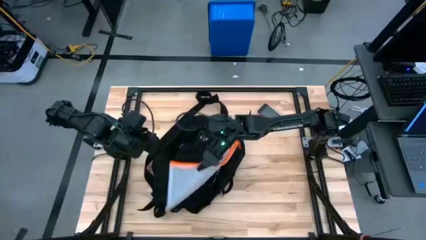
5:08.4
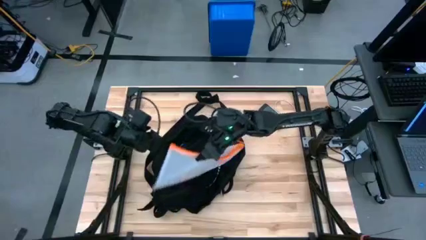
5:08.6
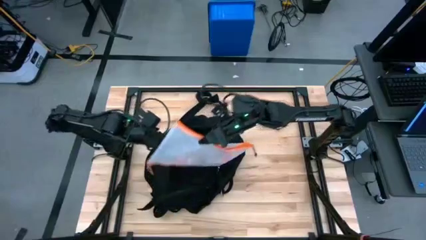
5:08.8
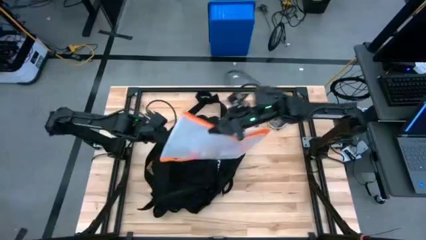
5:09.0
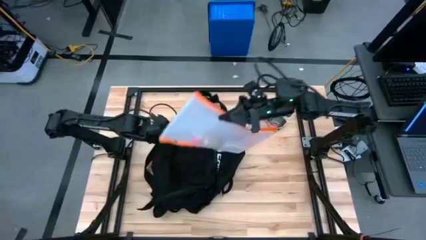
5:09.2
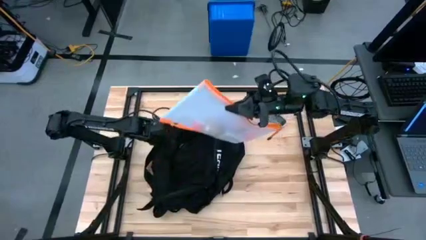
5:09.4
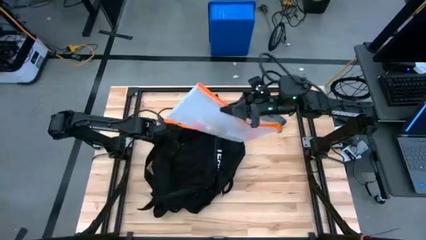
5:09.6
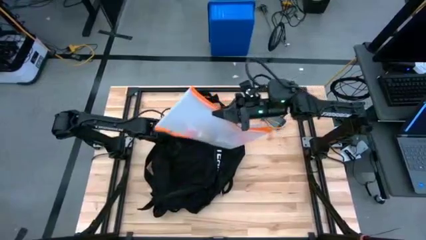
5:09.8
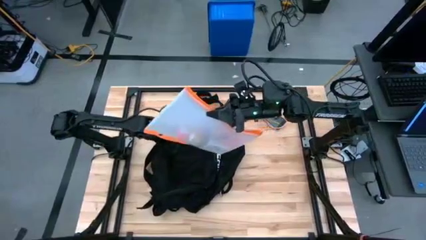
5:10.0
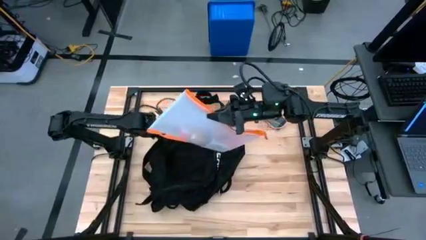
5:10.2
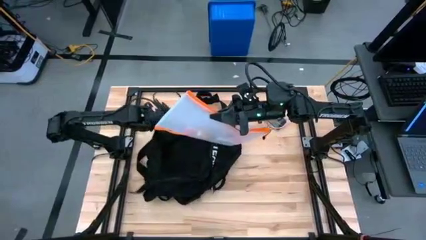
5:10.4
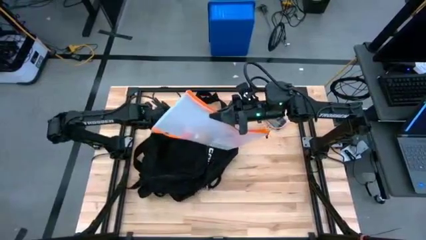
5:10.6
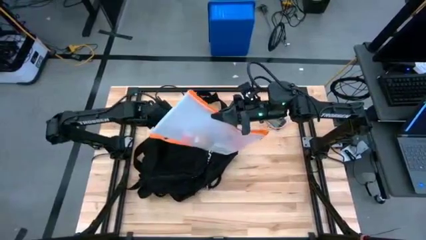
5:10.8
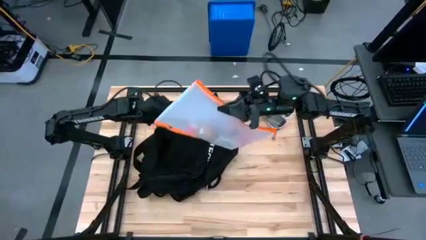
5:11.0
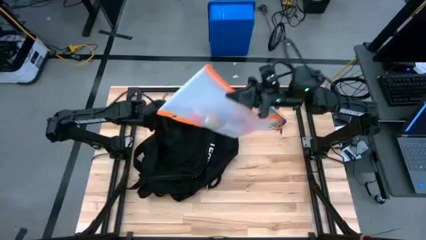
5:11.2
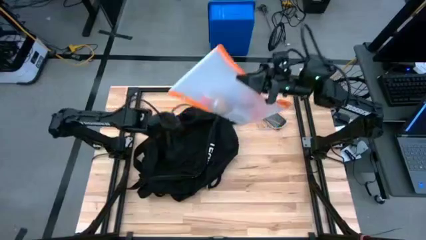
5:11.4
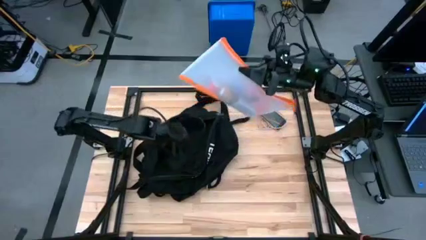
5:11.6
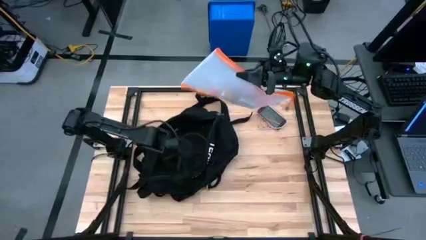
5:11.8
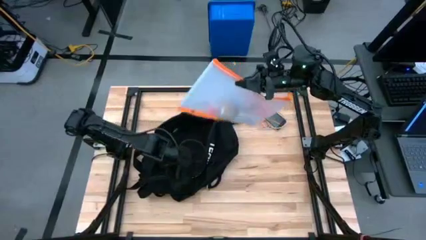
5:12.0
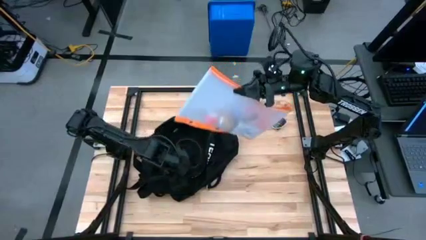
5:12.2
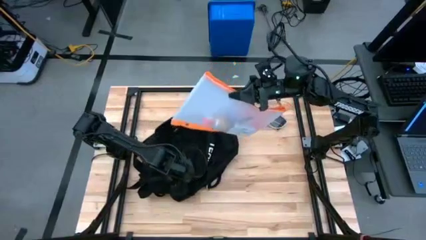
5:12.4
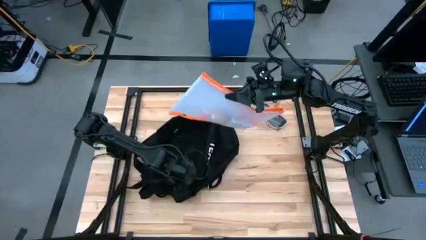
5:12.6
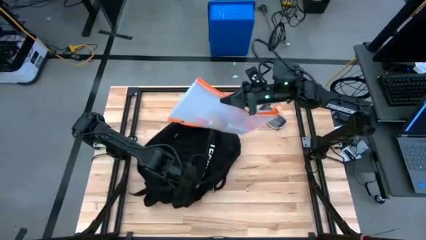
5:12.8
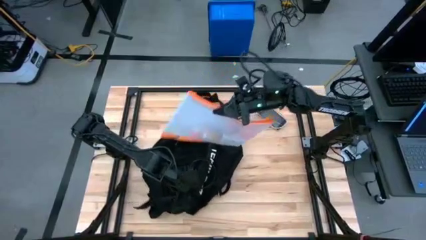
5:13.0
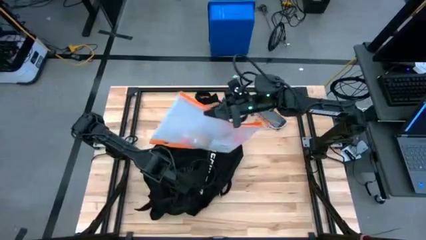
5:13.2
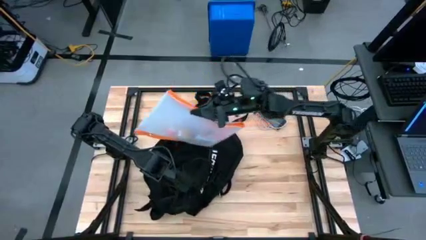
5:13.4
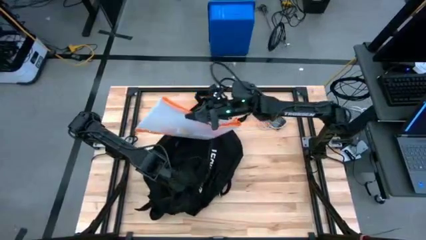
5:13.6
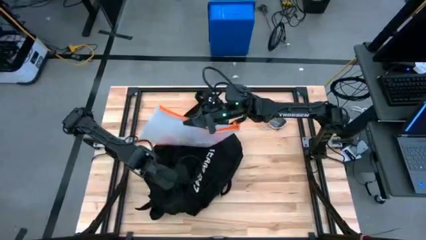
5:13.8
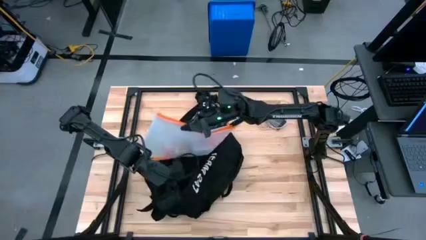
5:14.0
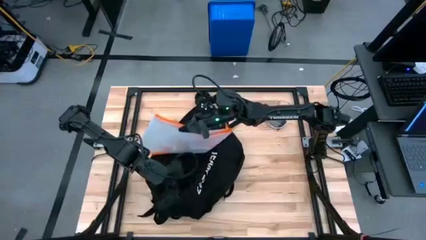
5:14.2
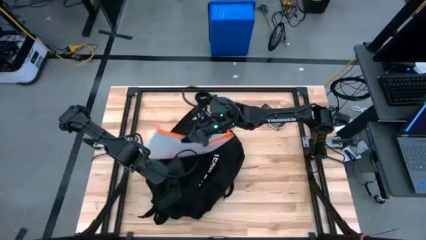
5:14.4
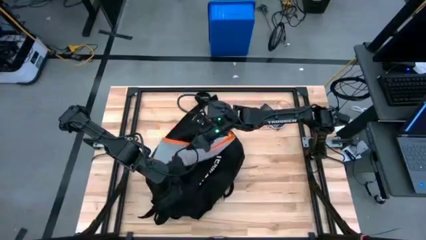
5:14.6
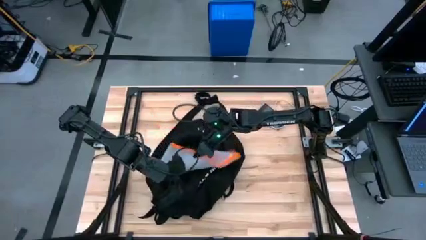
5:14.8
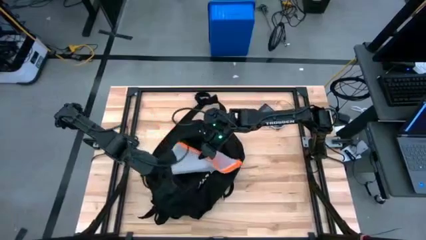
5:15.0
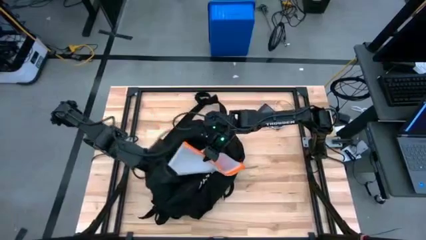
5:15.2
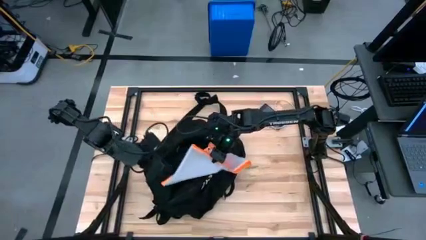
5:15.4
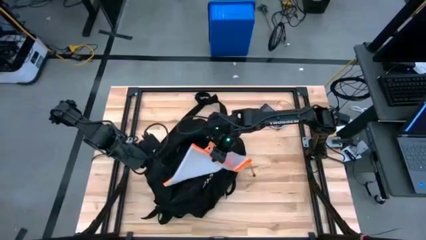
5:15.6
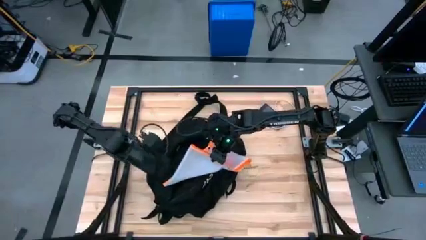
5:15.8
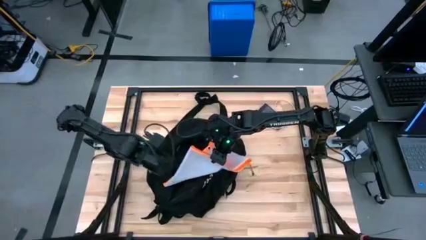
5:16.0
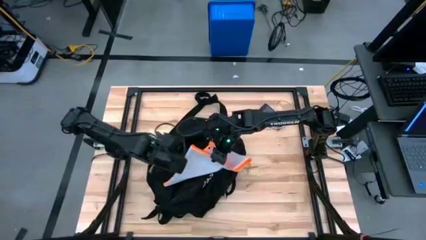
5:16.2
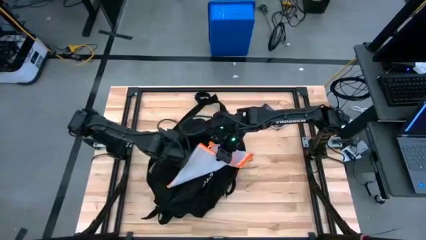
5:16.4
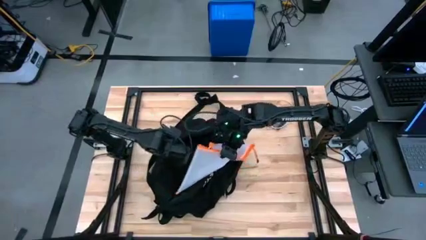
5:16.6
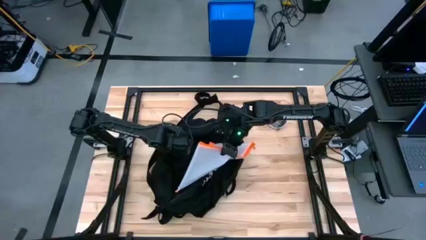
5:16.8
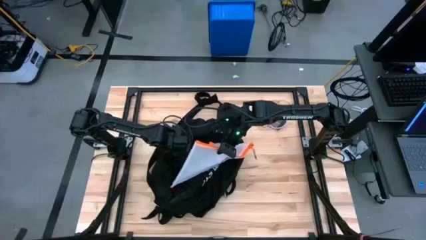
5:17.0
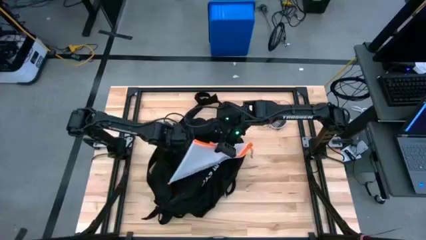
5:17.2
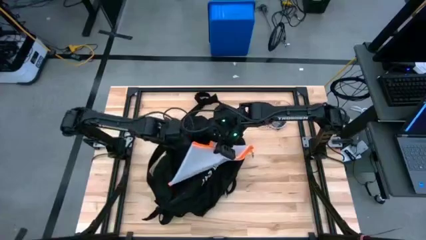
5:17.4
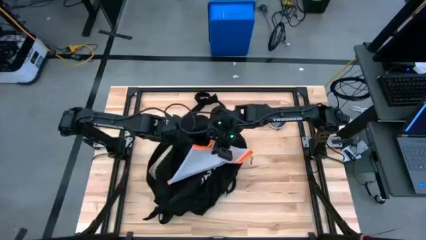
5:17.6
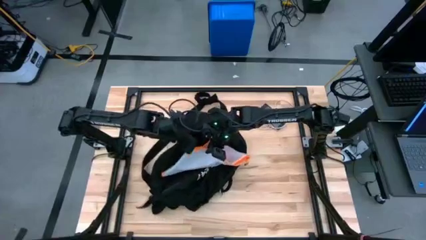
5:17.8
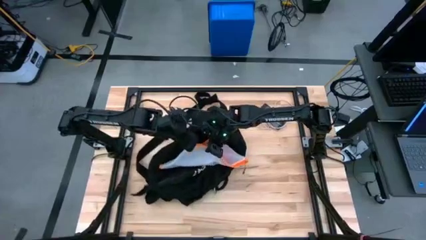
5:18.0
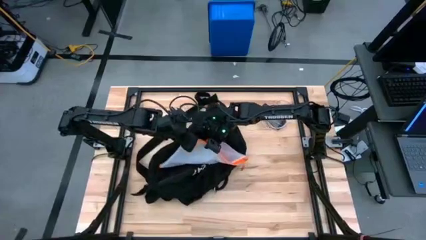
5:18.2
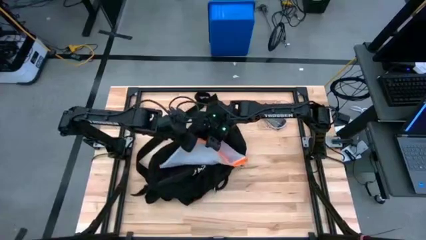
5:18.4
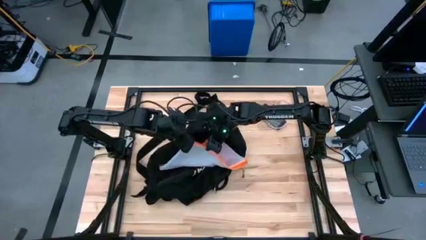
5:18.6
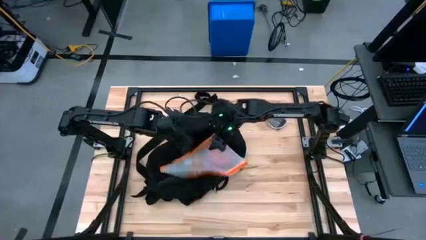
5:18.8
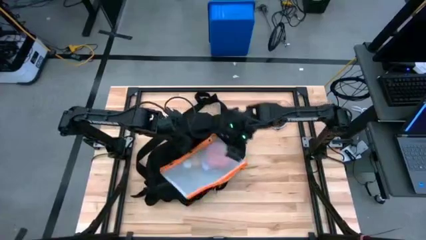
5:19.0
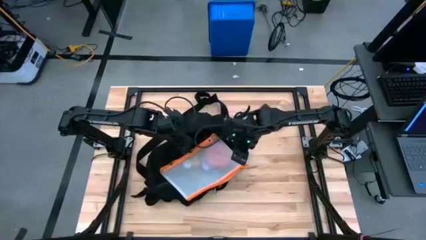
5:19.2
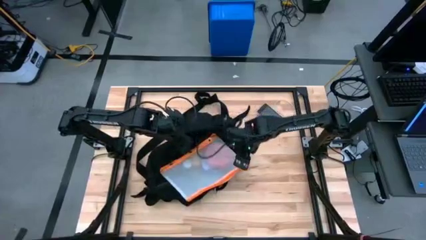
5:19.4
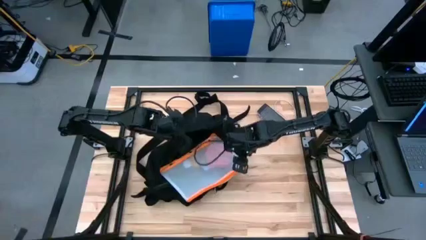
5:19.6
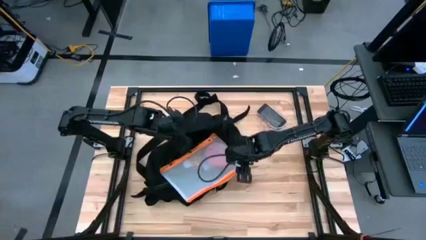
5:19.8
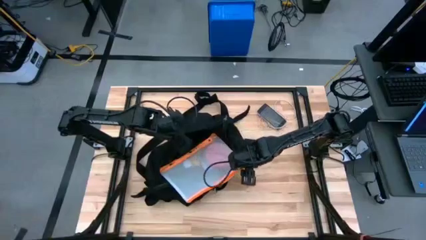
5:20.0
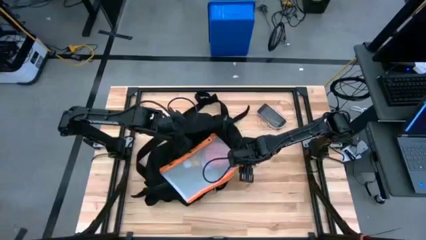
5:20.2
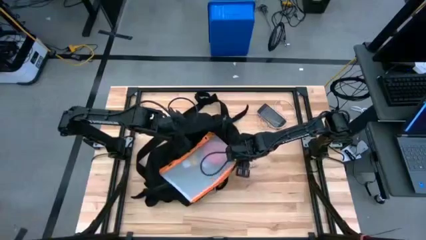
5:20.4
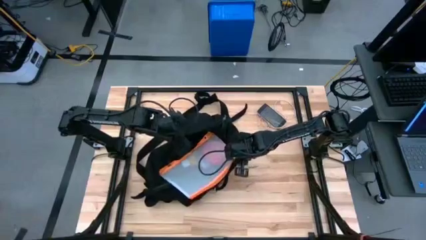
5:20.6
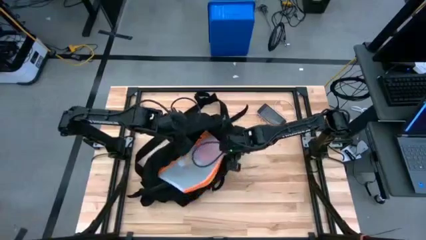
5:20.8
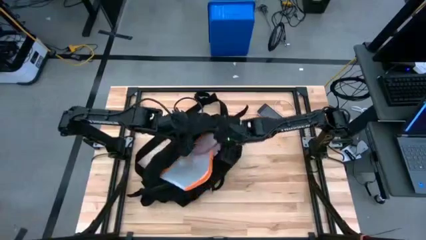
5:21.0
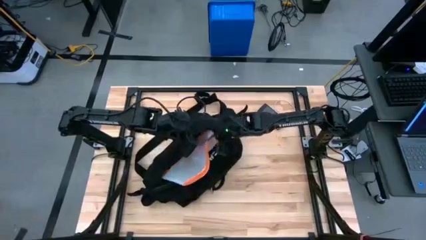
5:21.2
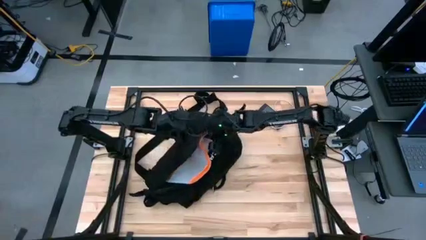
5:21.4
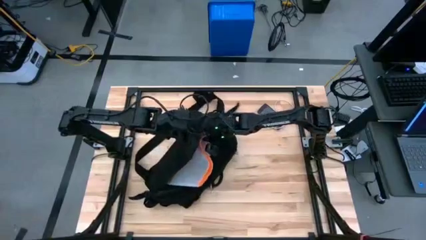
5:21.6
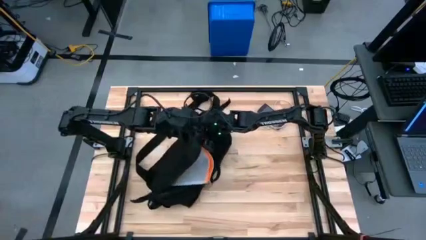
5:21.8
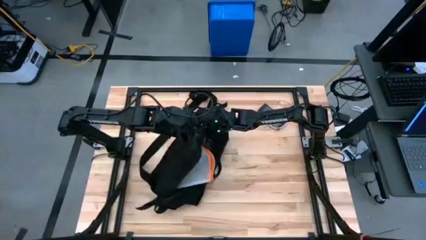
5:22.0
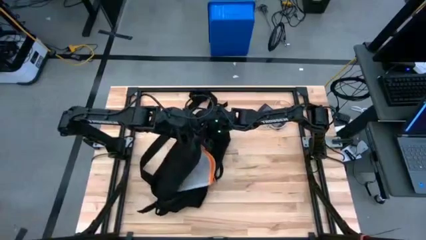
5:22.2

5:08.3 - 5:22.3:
Task: Unpack backpack
Put the orange zip bag into the black backpack

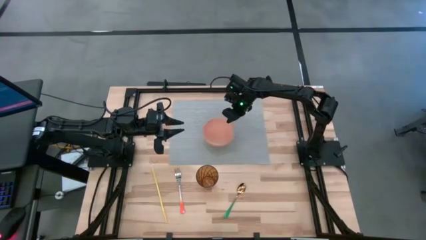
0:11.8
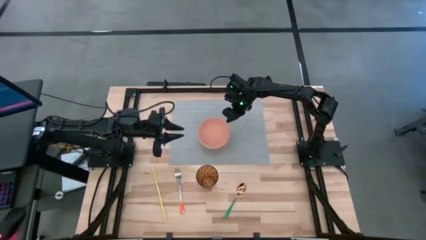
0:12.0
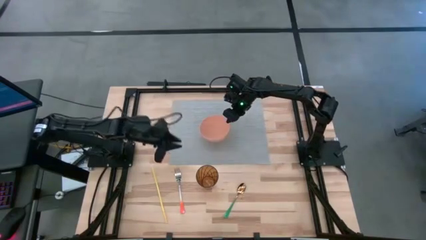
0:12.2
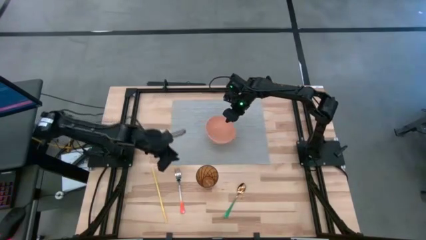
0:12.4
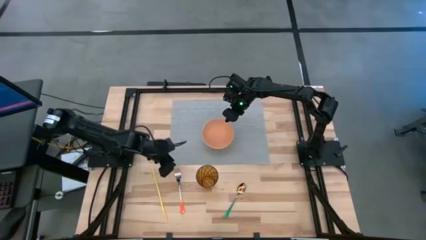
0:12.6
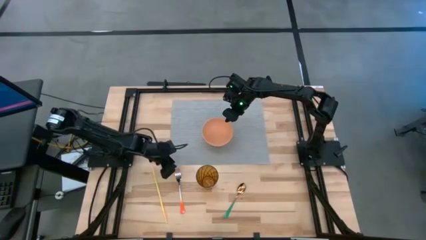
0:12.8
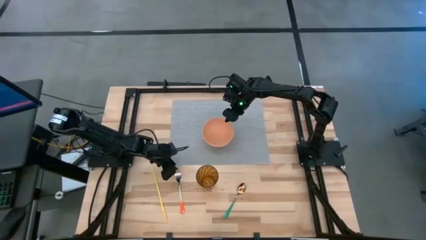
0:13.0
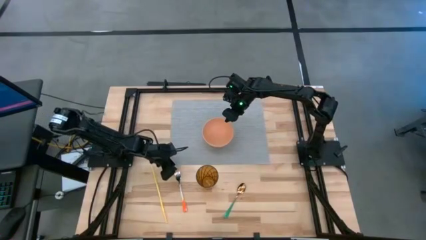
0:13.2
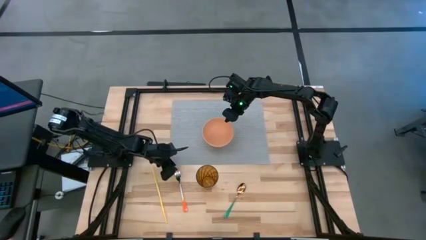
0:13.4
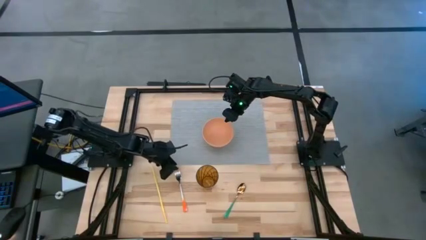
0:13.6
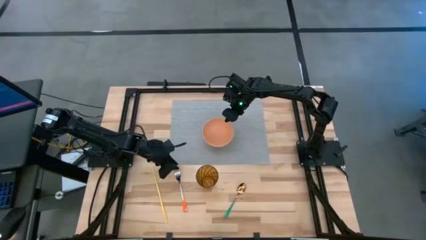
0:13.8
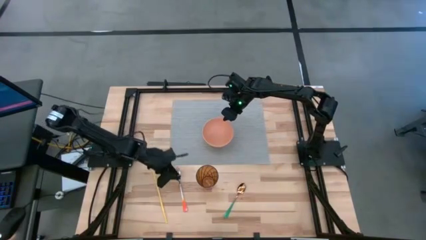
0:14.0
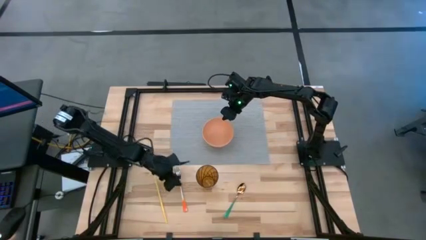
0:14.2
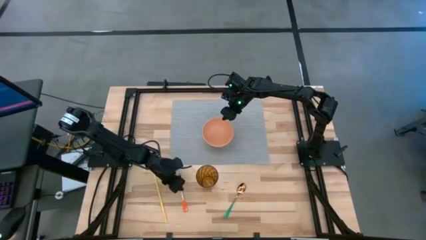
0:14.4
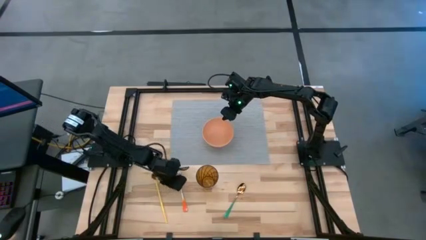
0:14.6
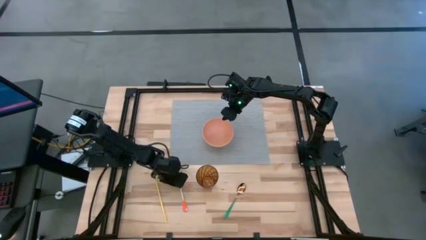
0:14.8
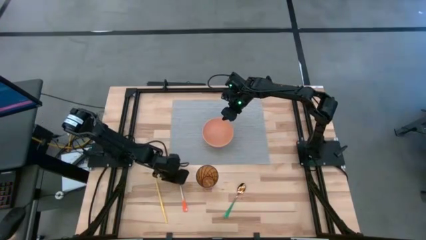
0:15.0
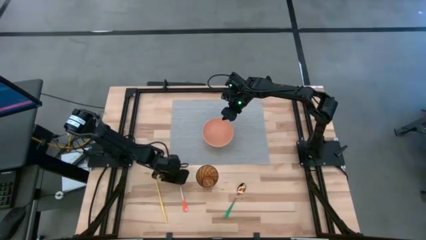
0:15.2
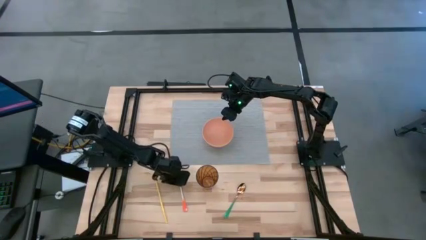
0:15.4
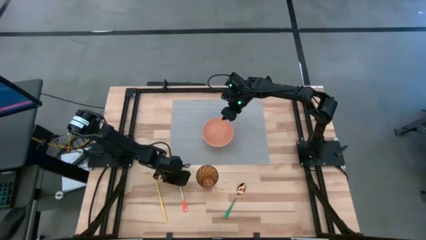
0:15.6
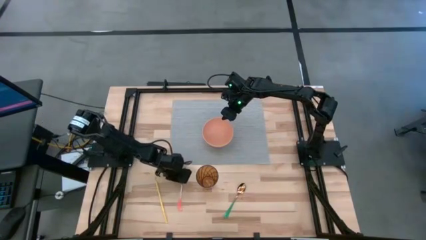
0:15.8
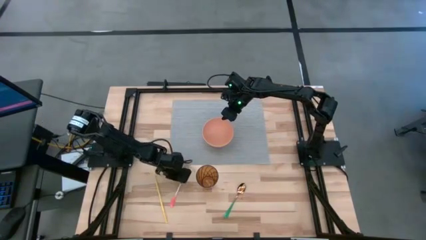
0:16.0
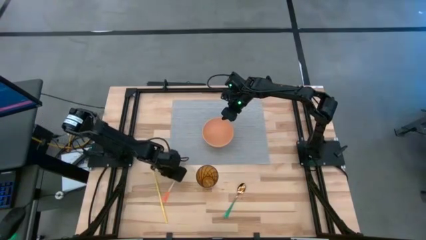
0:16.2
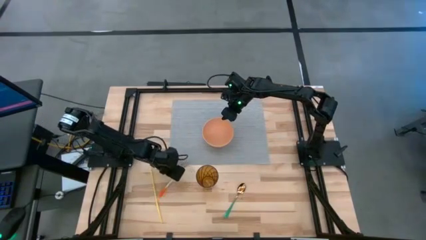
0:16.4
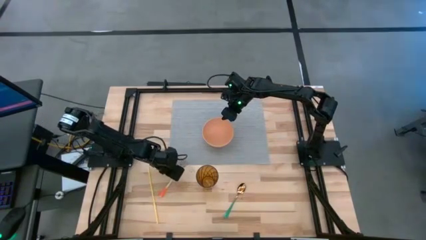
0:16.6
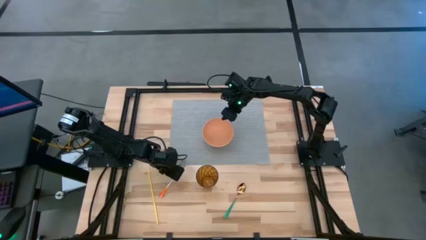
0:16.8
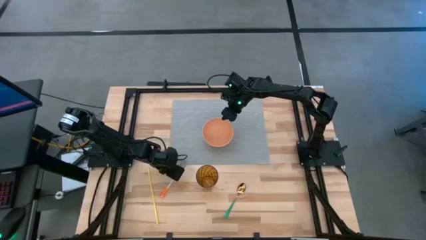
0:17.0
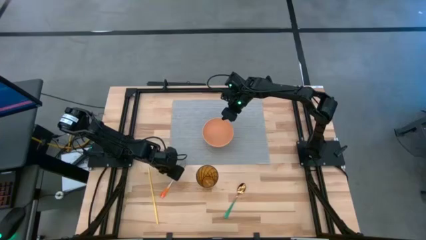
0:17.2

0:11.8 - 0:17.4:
Task: Pick & Place Utensil
Put the orange fork into the light orange bowl
